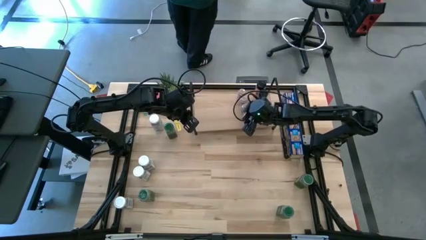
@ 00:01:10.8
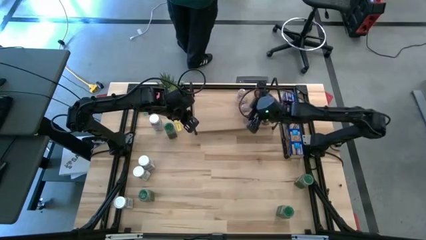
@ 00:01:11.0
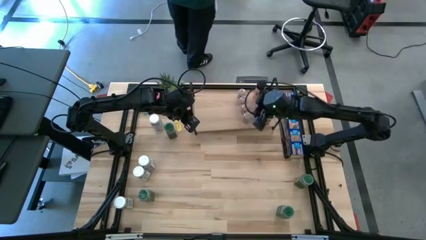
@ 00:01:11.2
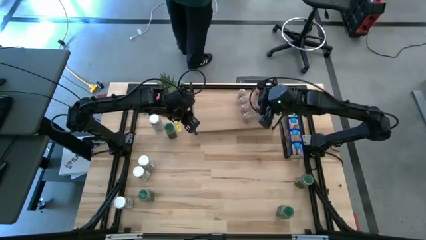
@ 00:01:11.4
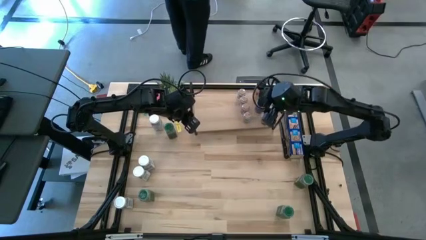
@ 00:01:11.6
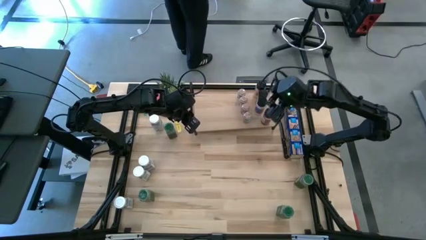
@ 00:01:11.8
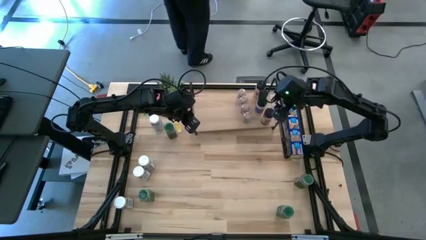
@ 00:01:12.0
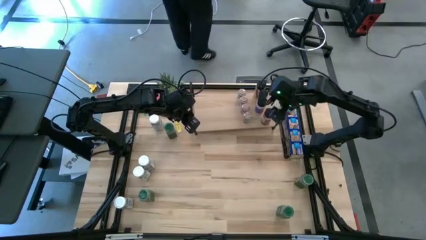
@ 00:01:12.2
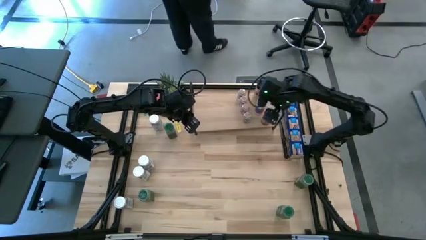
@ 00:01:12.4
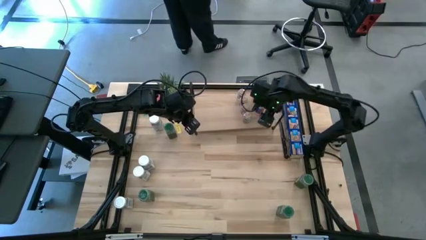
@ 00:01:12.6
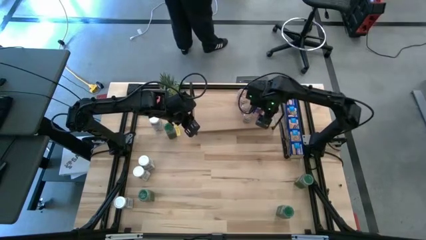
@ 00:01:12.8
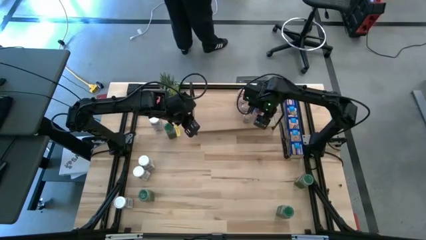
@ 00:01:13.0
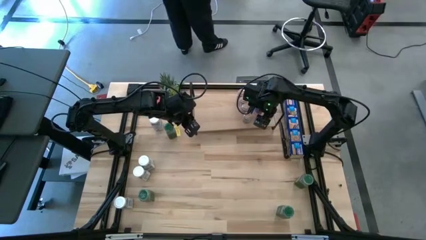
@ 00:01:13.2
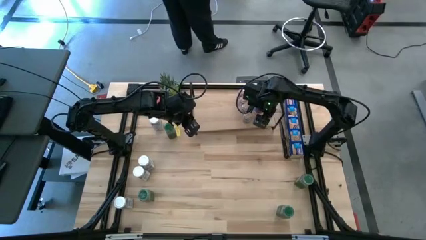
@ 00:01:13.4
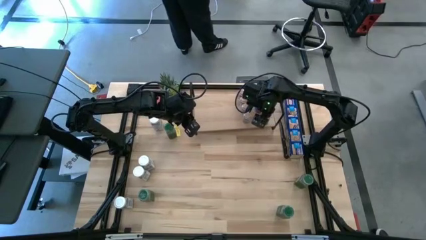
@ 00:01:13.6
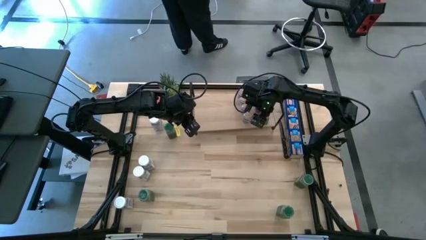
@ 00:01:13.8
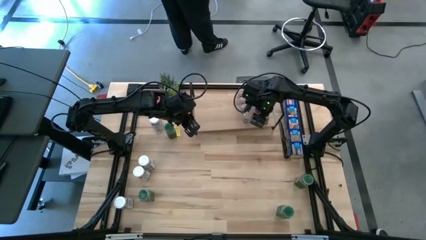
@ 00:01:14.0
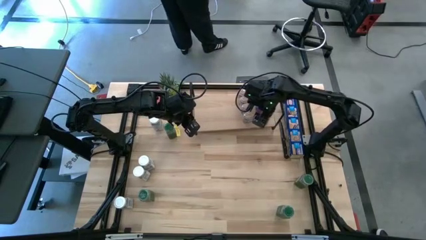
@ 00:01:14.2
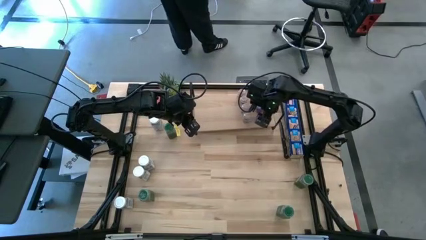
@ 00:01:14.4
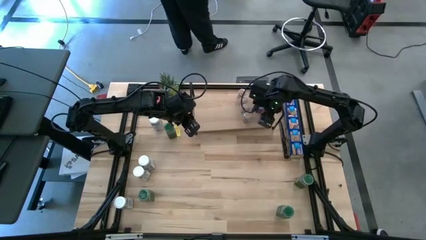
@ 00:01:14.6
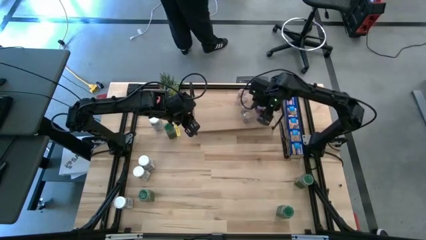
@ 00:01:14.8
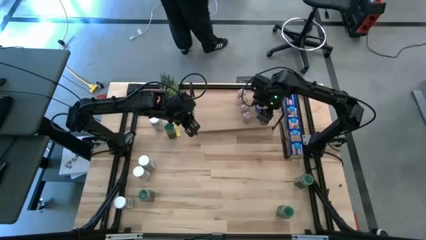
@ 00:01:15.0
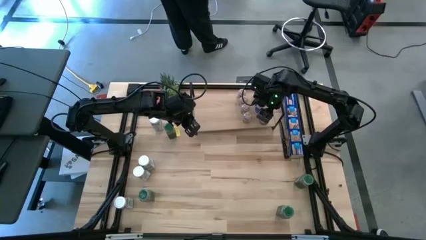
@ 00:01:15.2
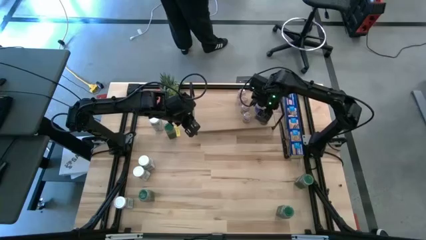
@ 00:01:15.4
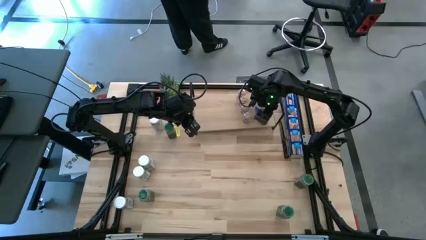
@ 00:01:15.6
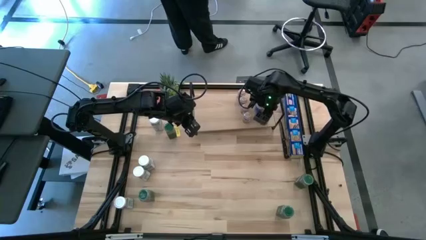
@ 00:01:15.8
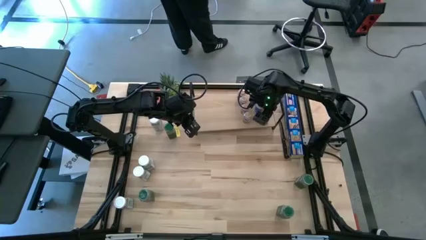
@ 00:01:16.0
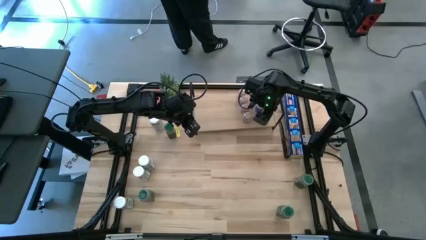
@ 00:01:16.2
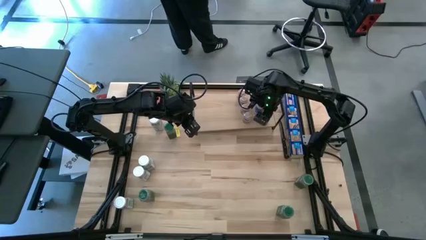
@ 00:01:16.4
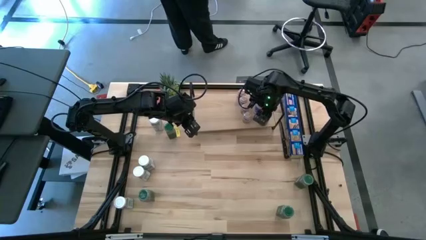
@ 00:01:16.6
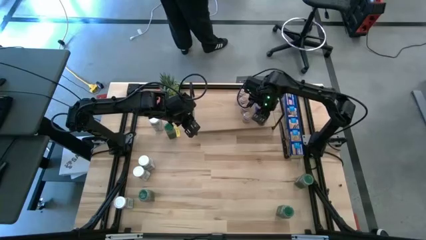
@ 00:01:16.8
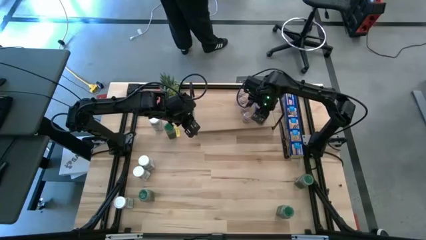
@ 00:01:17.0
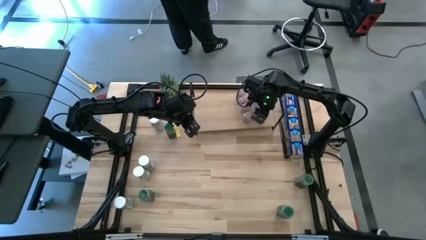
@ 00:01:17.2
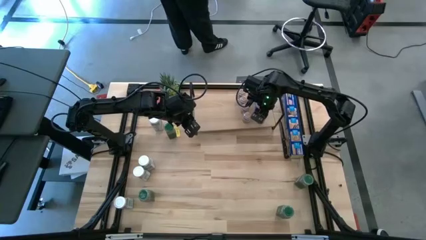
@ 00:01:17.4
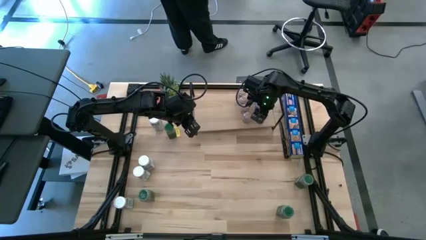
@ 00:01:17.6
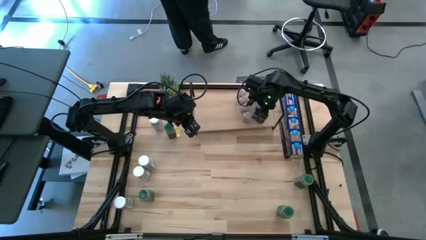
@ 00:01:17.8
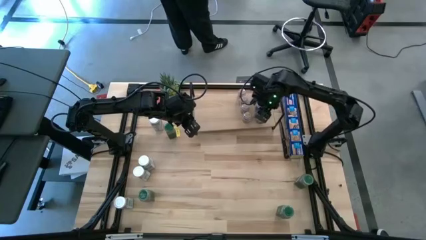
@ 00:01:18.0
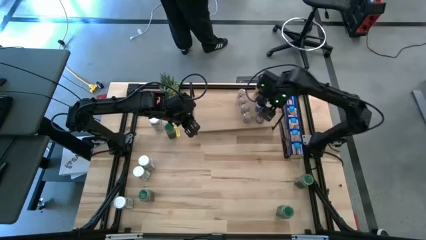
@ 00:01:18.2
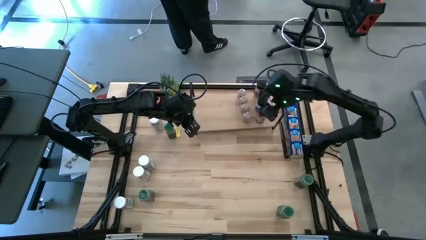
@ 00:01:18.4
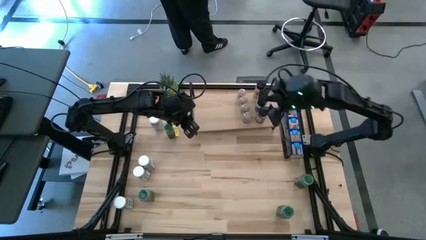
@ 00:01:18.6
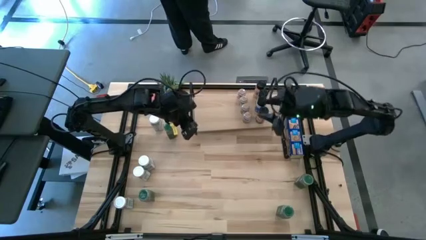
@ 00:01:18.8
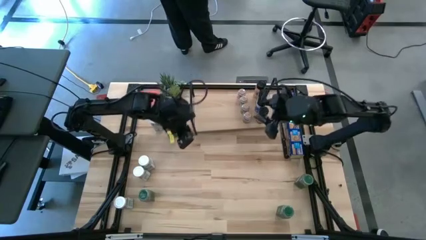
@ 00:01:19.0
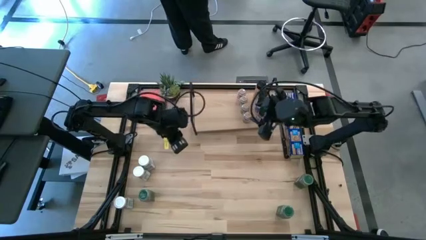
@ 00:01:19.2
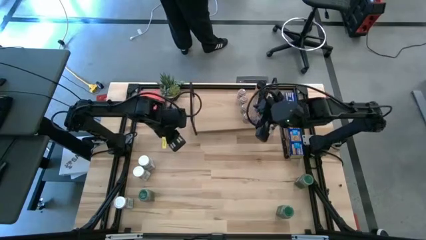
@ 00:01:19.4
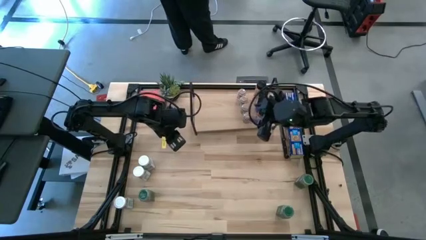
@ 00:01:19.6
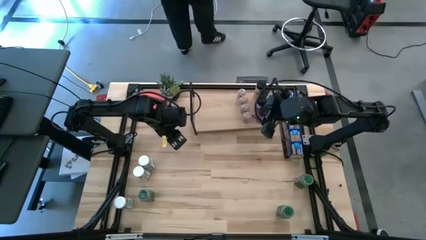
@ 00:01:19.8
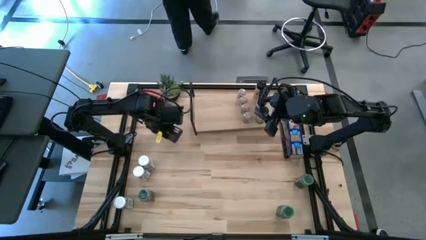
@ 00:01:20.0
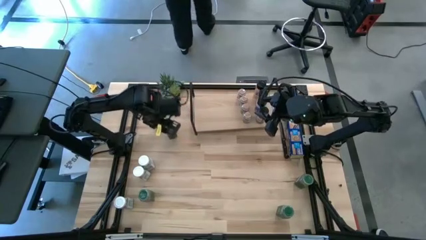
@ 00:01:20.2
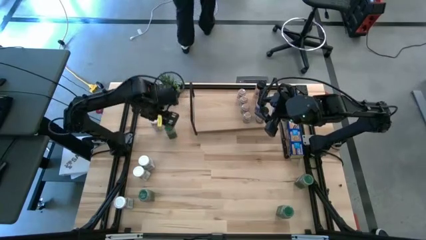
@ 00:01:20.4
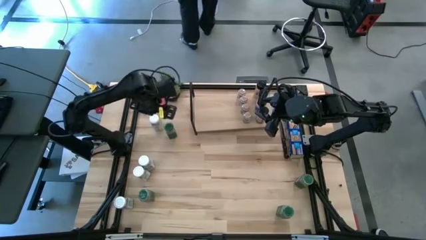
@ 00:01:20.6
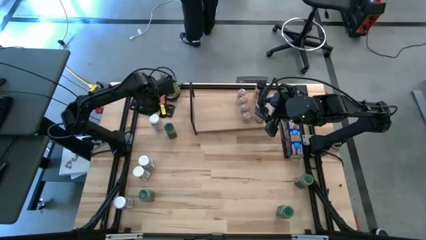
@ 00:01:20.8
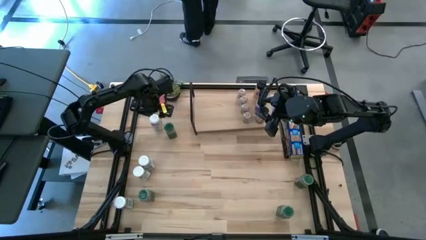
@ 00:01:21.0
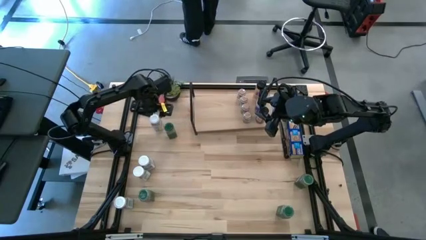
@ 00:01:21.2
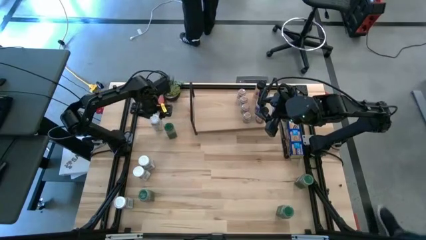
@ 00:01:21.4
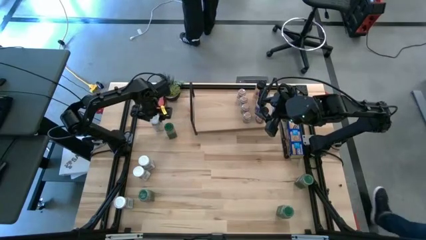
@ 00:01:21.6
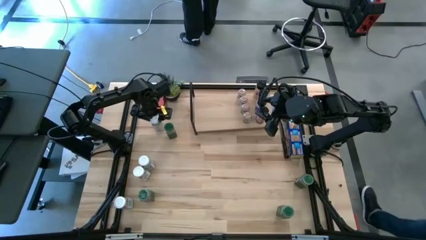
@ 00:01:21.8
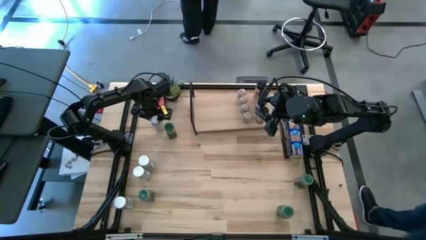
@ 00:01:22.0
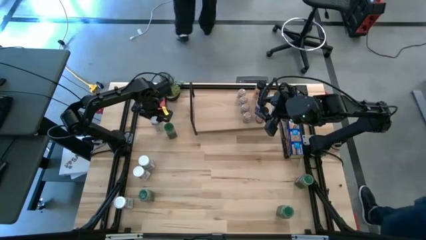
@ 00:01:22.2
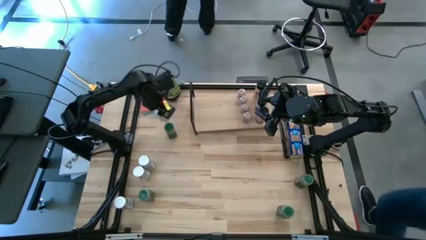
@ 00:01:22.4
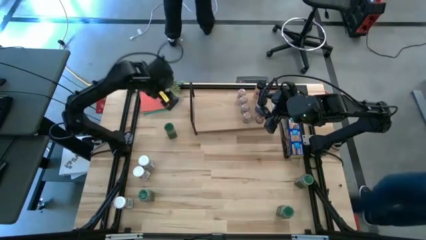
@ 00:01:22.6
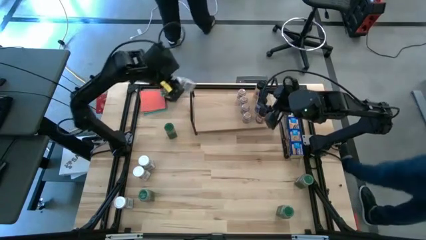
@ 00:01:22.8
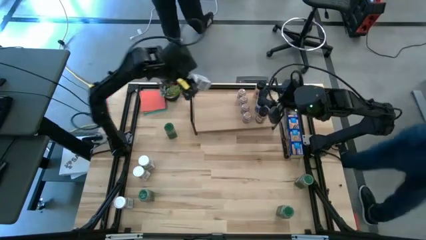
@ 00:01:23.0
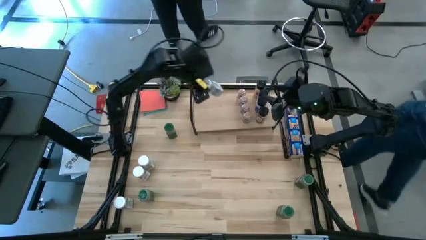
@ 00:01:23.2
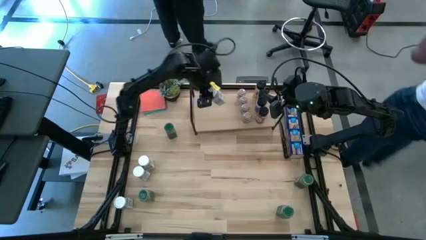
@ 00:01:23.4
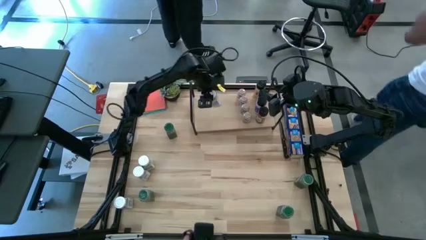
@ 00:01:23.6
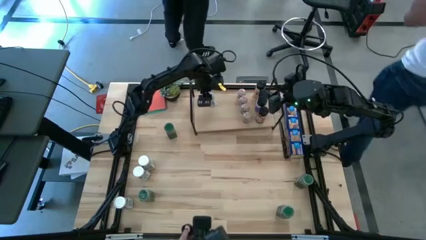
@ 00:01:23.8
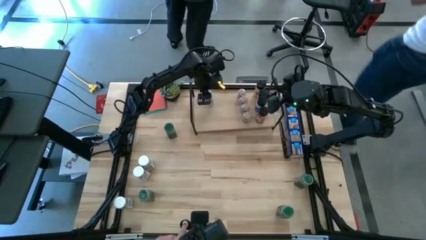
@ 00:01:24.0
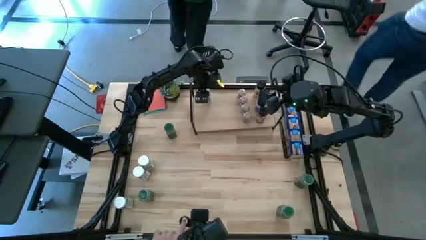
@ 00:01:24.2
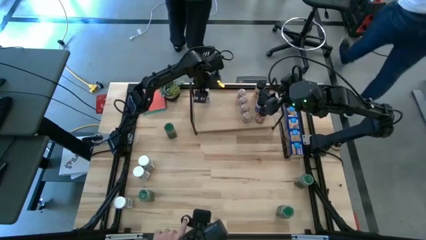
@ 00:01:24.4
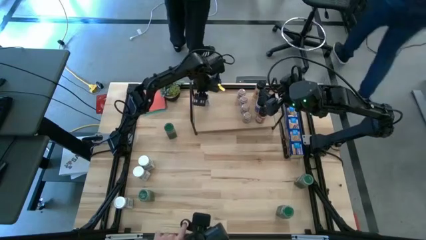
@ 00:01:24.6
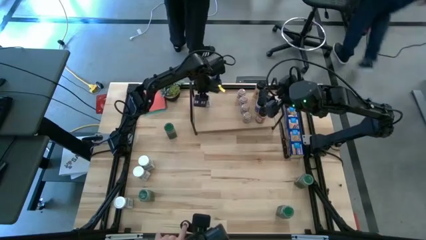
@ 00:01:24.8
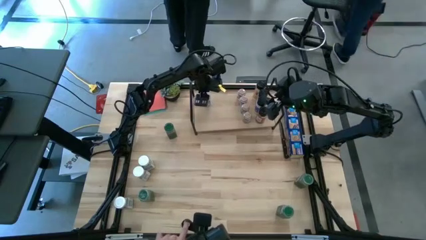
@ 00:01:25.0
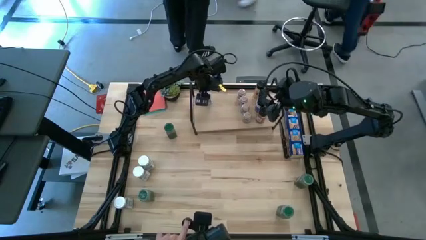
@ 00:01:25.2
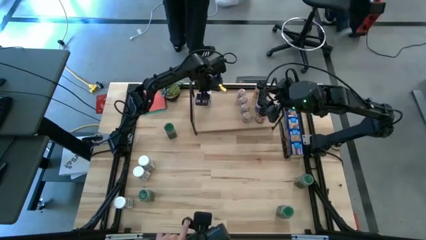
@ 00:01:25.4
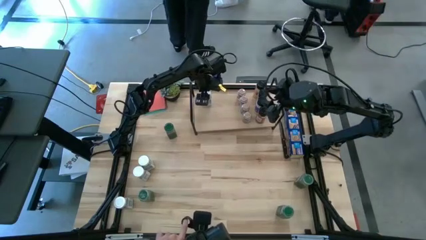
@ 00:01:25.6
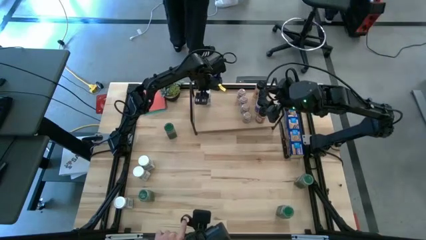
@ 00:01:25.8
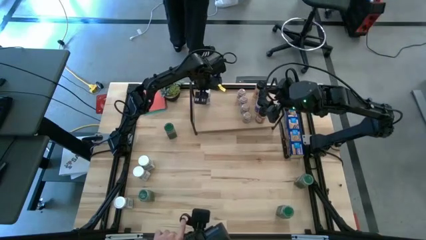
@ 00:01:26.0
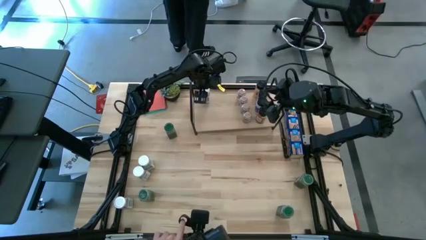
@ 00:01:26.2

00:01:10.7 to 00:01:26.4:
Task: Shelf spices
Put the white seasoning bottle on the shelf

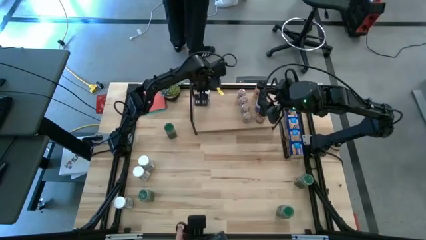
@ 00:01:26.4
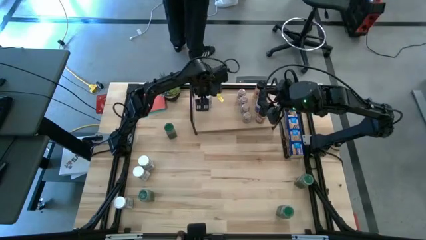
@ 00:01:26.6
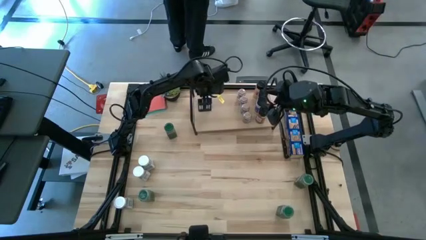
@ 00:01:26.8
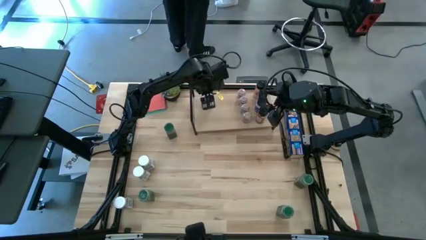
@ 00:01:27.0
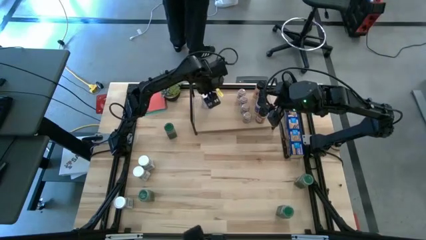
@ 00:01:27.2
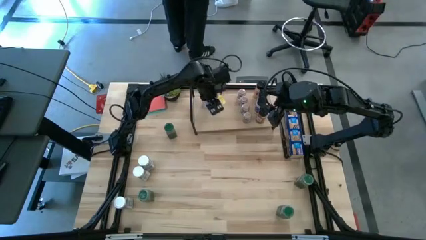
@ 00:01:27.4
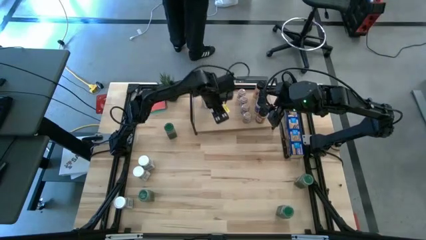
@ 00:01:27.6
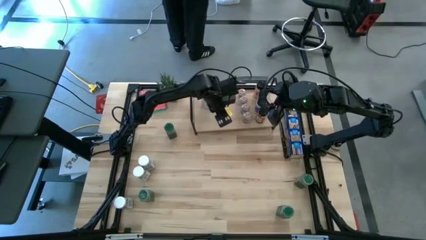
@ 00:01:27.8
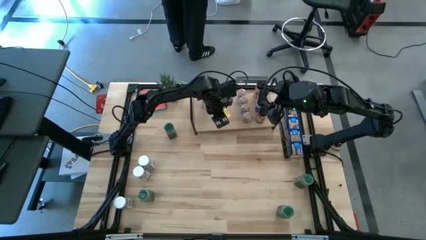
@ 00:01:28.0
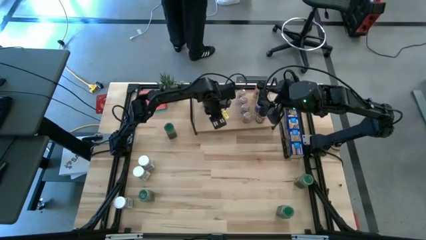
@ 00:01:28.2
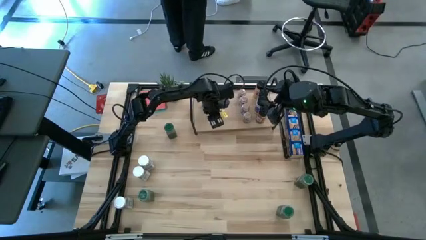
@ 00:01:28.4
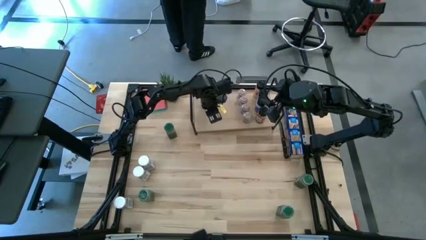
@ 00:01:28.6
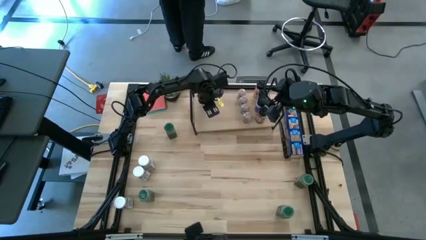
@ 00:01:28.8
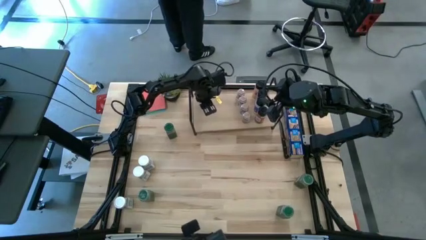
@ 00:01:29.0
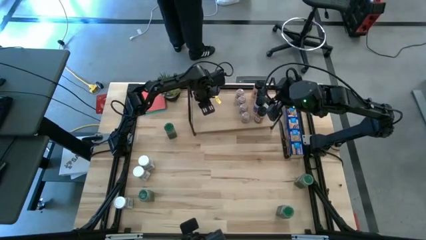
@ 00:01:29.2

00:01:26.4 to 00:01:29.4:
Put the white seasoning bottle on the shelf
